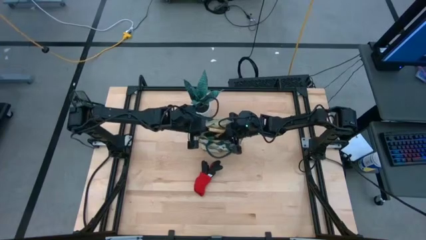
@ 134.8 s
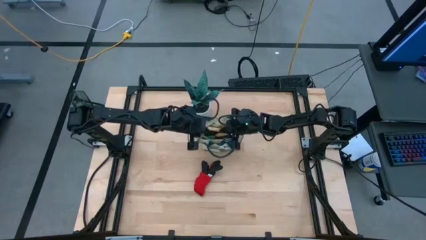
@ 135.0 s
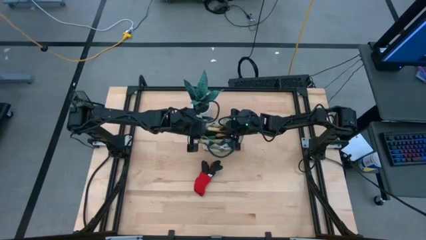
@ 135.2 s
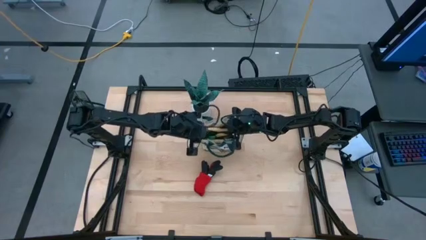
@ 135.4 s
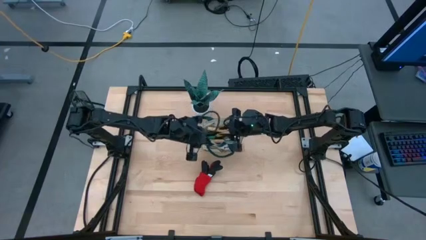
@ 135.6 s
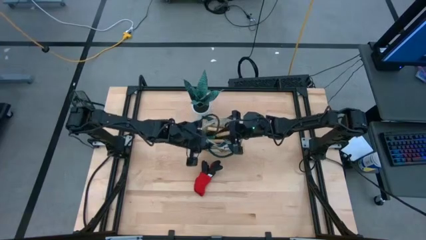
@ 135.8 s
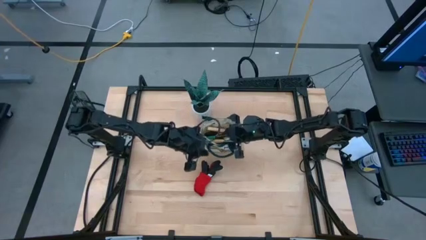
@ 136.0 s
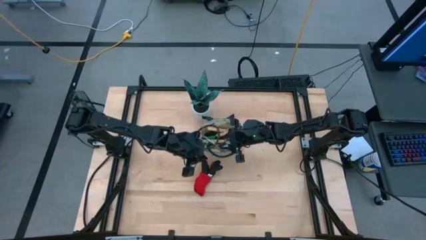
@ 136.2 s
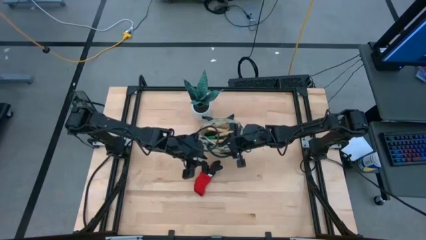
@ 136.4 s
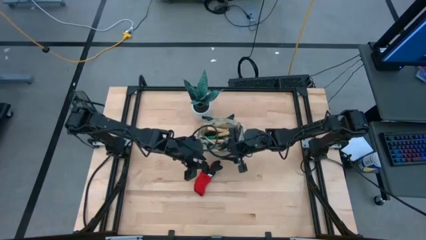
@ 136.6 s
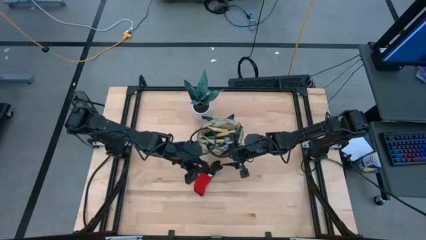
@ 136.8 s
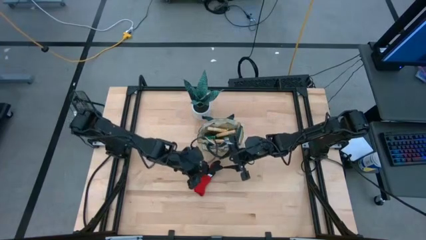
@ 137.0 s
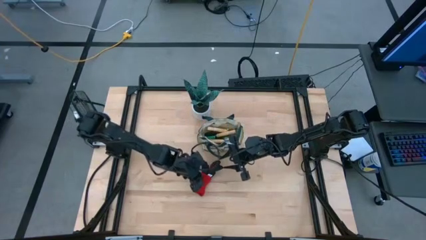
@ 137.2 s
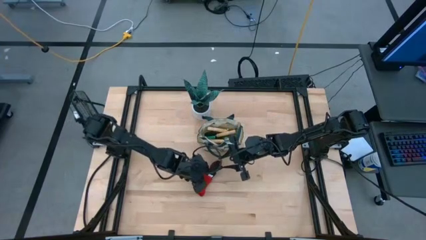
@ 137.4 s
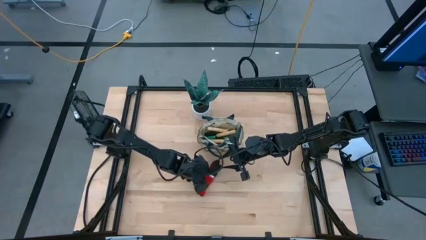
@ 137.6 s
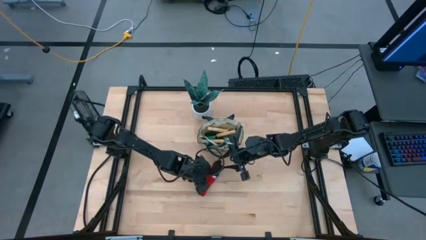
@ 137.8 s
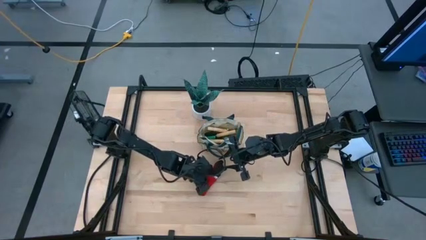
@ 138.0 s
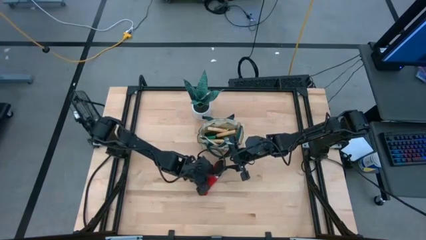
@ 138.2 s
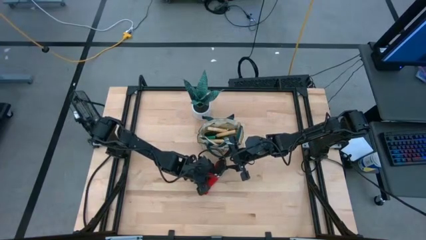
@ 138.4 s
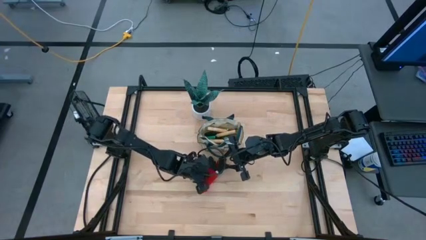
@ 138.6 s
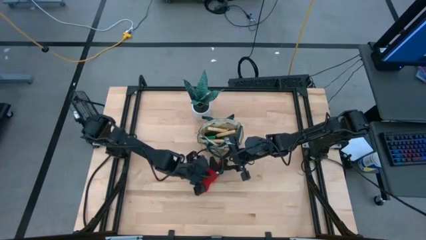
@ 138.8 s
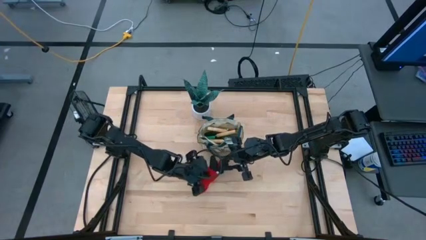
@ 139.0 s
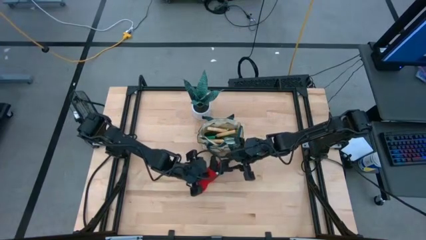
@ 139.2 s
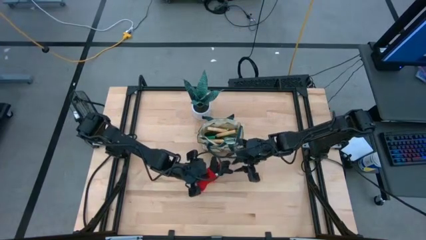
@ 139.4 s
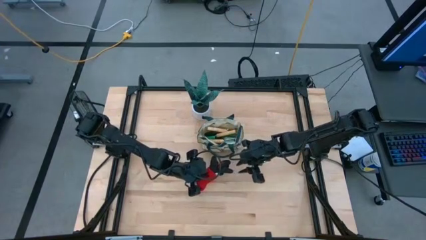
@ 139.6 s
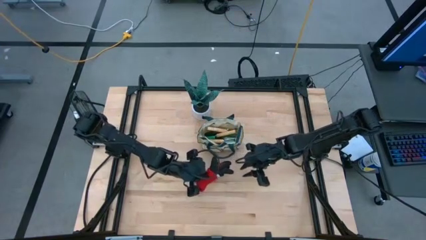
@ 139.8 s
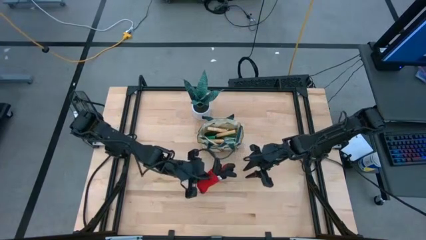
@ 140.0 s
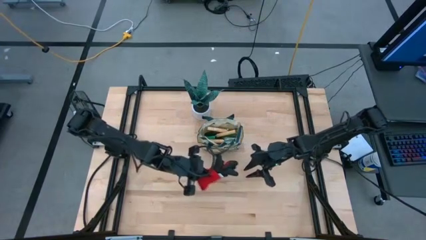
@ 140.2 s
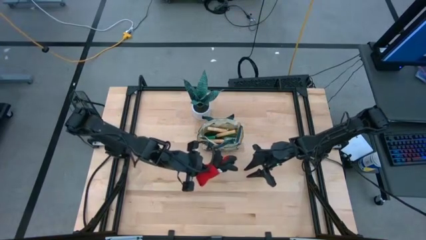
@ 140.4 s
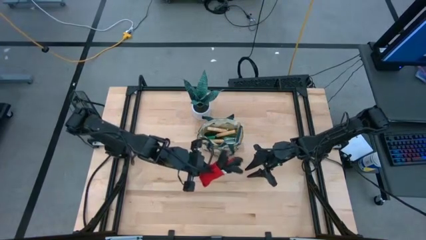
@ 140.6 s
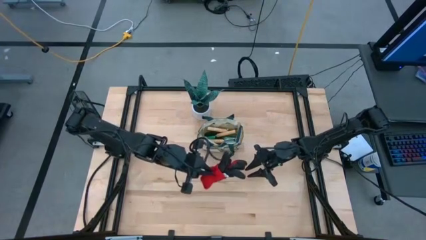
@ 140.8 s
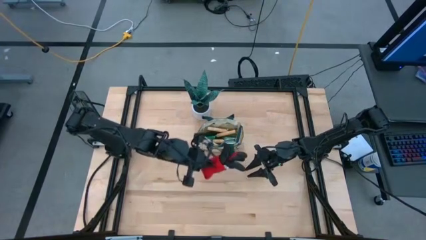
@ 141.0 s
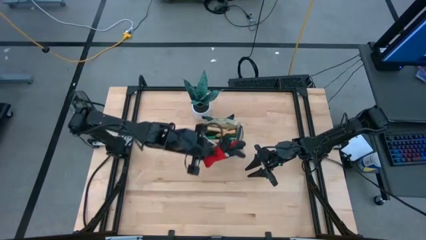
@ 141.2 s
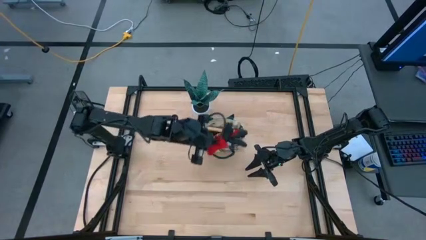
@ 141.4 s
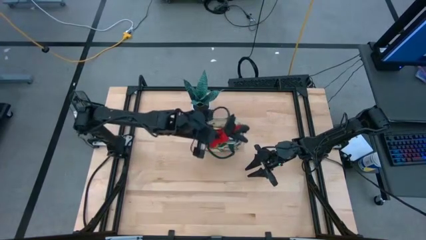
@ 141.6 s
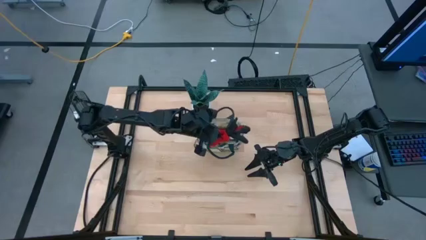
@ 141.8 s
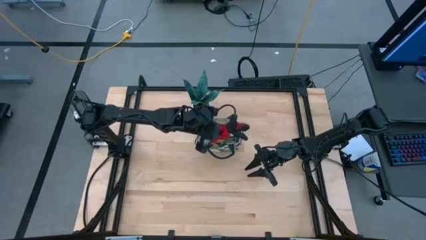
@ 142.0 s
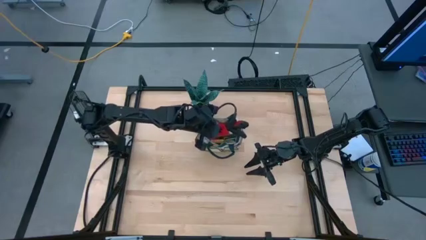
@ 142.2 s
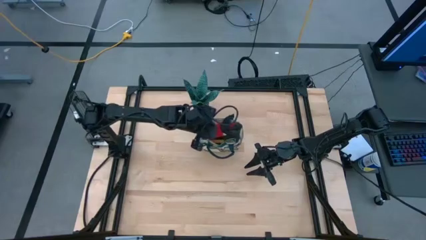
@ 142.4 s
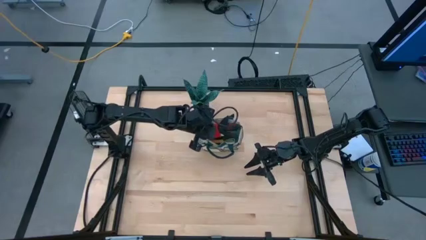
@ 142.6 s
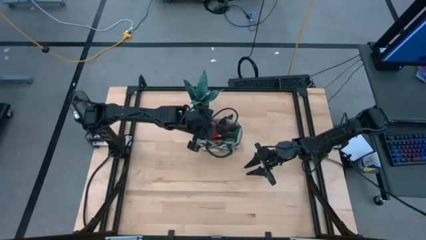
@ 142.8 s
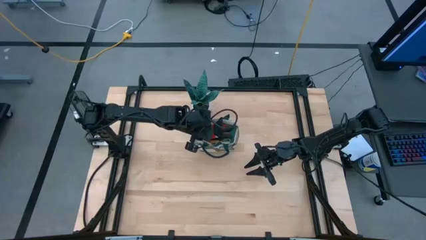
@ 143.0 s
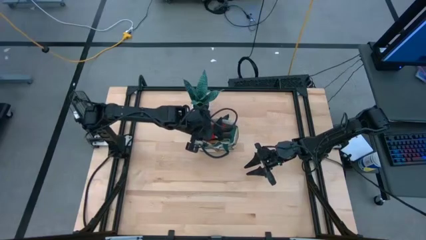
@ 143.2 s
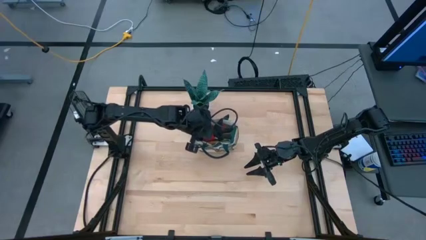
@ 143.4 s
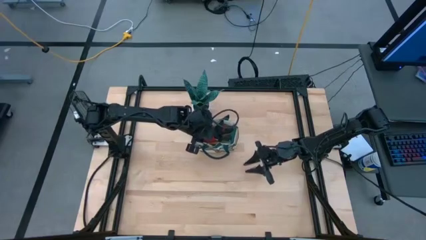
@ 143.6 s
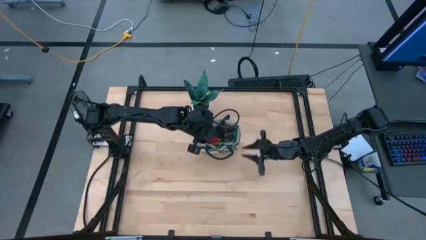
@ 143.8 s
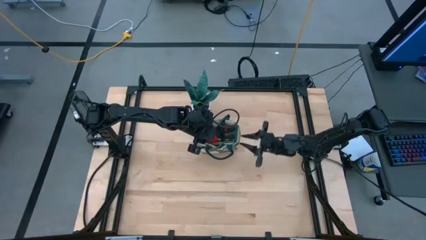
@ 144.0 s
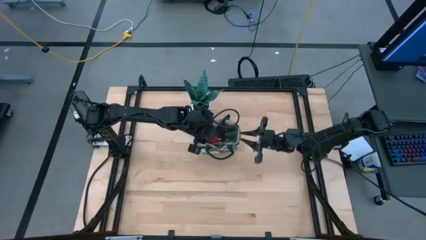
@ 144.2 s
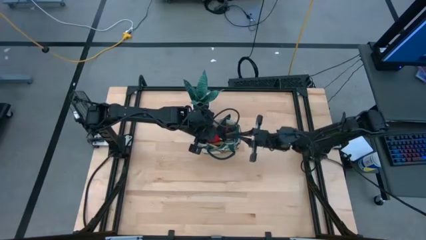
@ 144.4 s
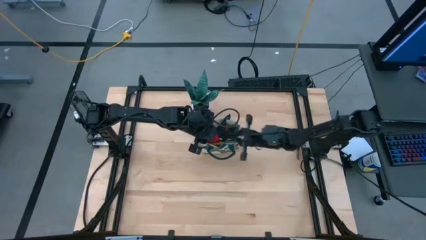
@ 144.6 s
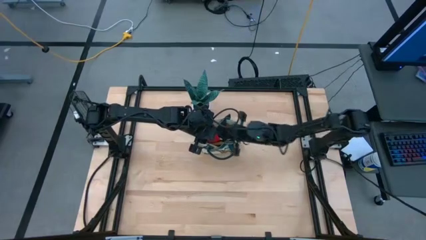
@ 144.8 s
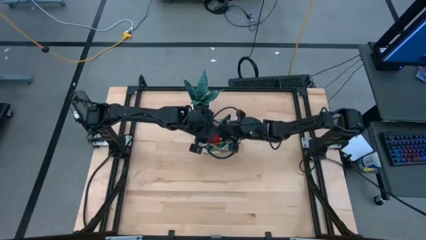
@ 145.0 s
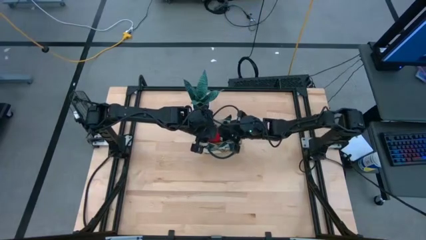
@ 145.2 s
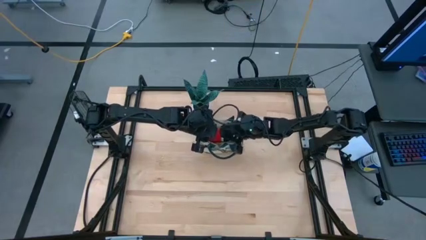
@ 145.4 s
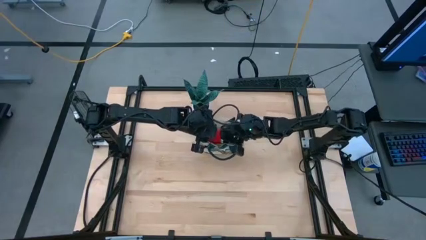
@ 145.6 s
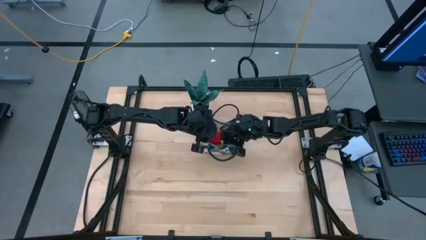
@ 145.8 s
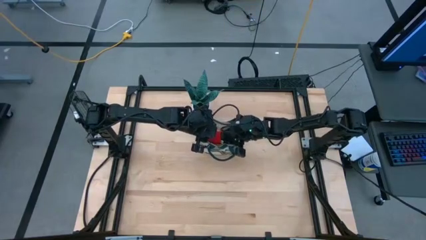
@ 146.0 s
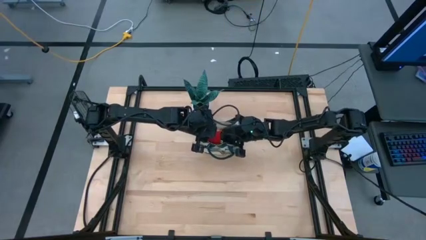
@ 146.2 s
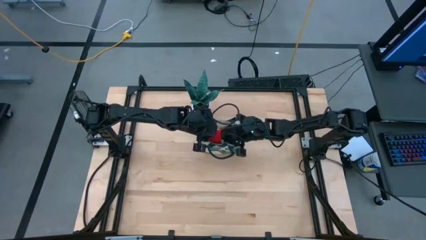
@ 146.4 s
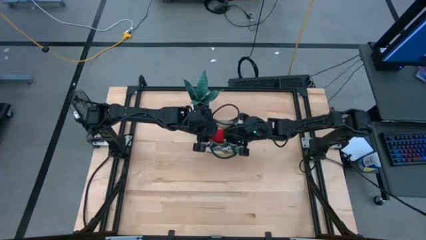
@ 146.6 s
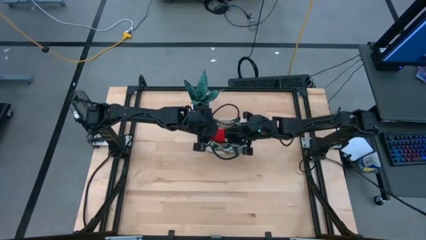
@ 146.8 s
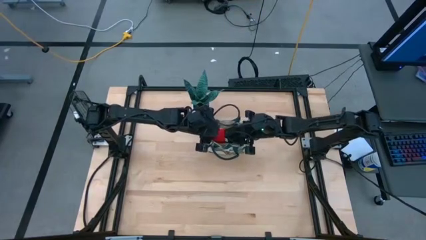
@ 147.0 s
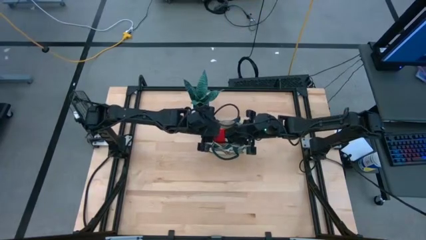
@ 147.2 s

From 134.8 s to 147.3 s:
Task: Pick & Place Garden tools in Gardening bag
Put the red glove into the gardening bag

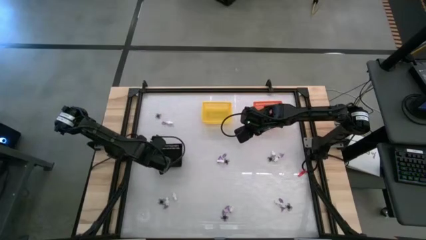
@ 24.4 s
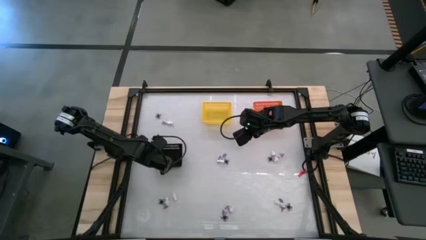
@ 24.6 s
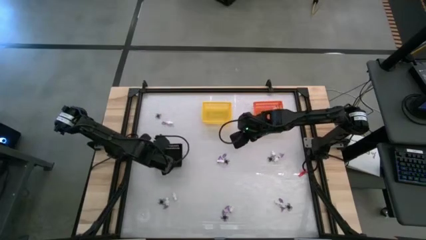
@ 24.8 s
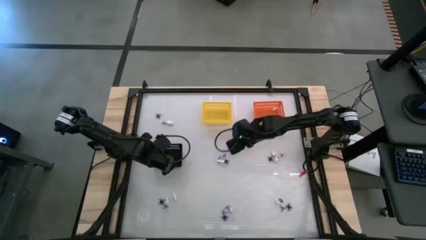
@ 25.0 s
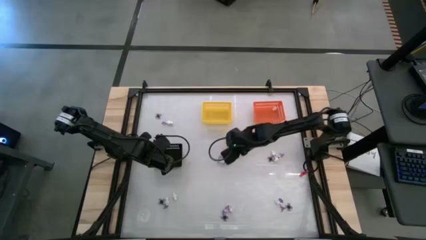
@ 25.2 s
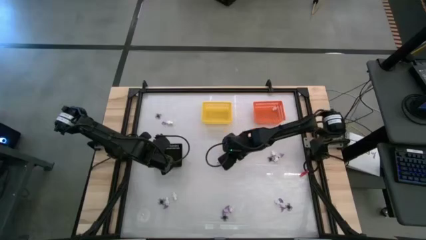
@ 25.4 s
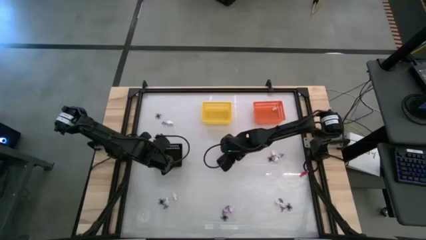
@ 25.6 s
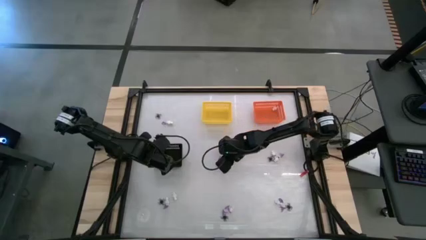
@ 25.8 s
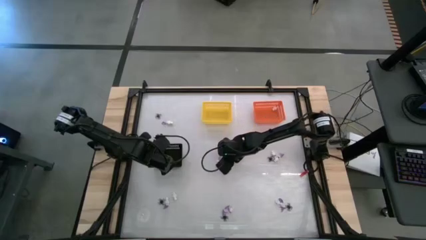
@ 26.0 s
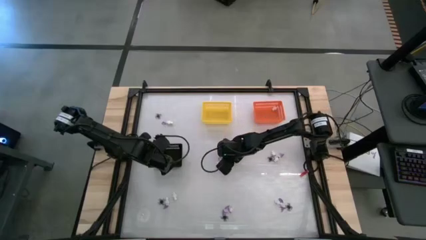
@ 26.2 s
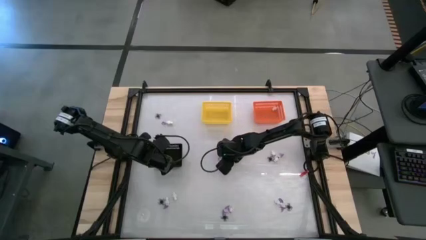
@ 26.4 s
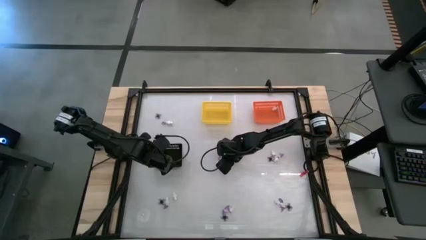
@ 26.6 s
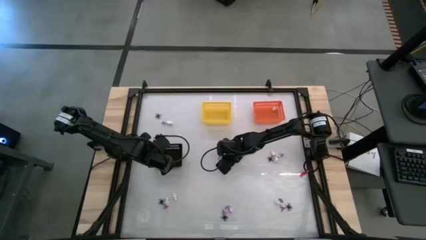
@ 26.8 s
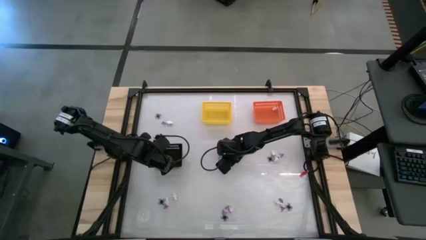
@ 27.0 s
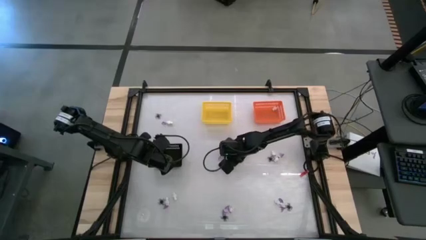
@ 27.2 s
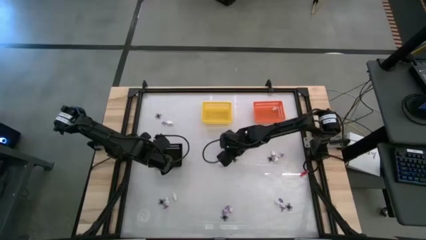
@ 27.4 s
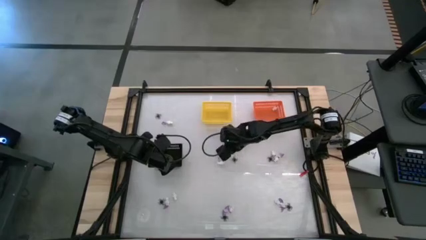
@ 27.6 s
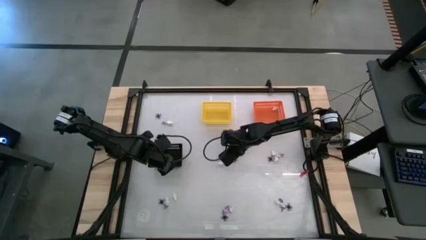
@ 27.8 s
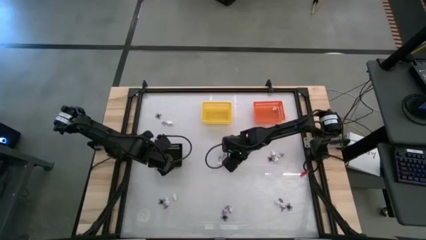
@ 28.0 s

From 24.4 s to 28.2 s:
Task: Sort Halloween decoration
Put the black spider toy into the yellow basket
